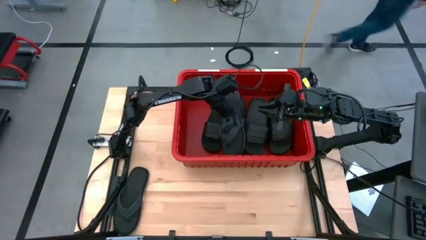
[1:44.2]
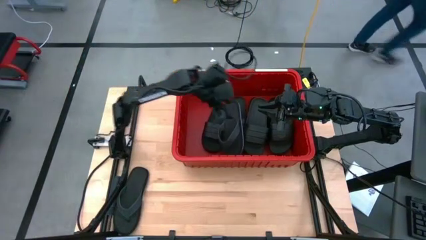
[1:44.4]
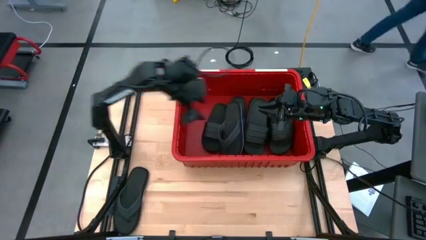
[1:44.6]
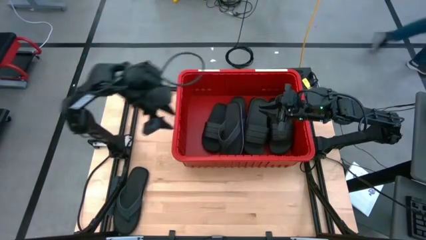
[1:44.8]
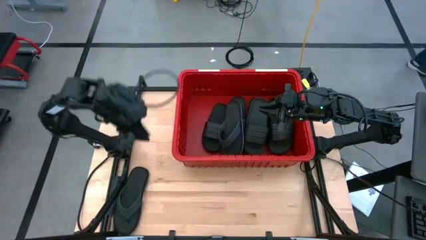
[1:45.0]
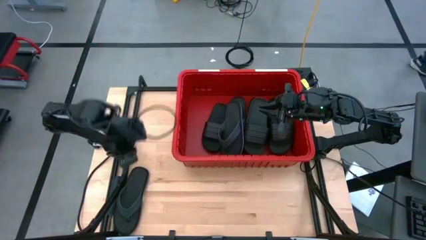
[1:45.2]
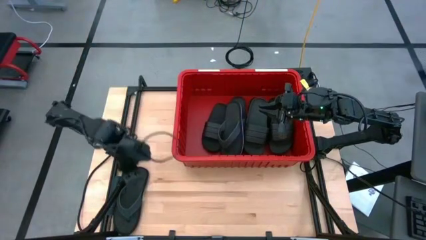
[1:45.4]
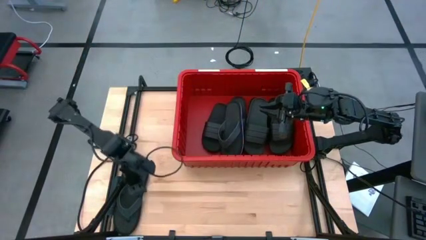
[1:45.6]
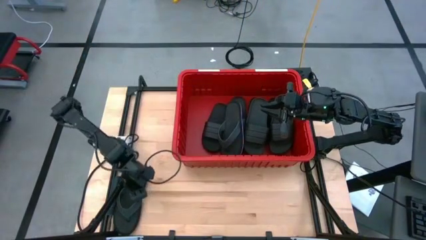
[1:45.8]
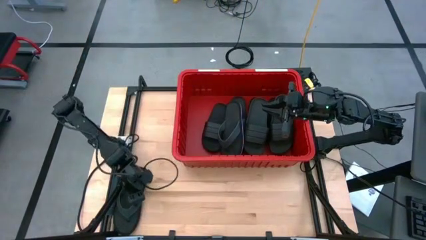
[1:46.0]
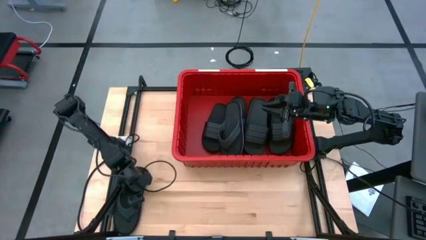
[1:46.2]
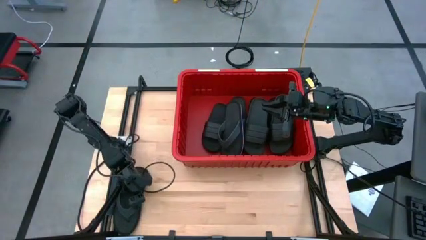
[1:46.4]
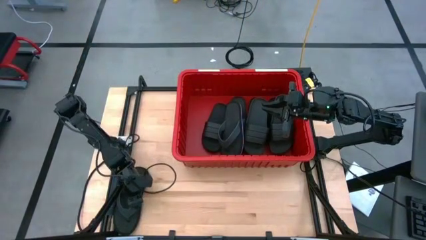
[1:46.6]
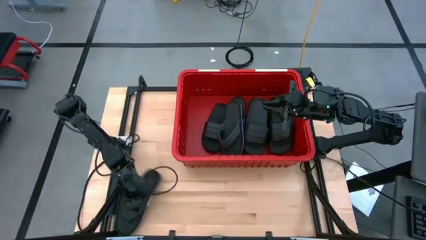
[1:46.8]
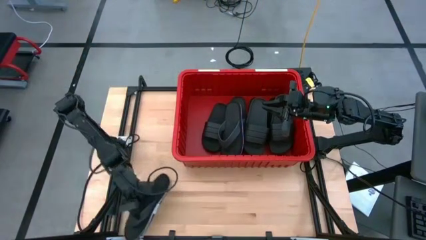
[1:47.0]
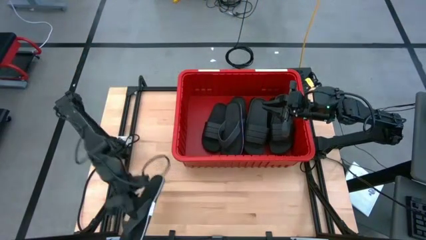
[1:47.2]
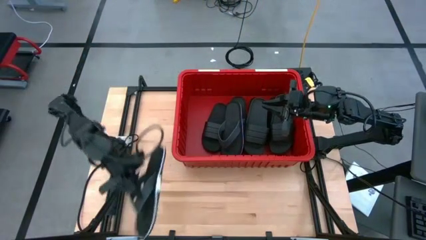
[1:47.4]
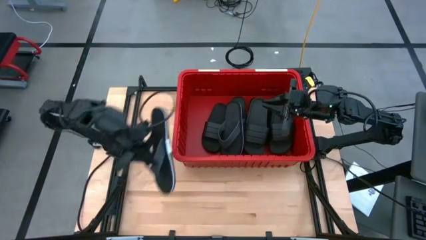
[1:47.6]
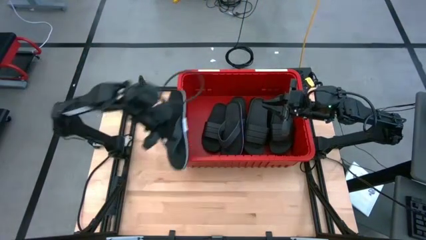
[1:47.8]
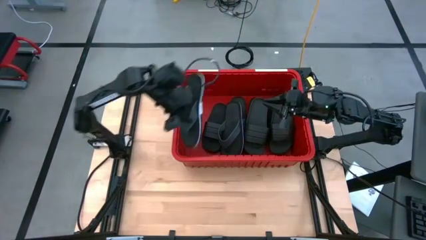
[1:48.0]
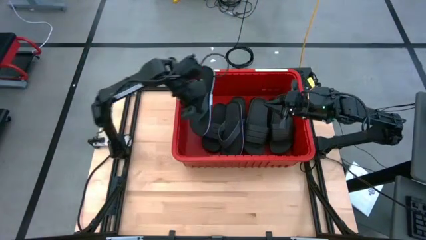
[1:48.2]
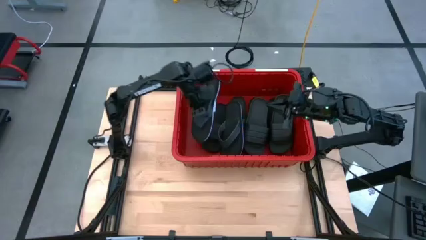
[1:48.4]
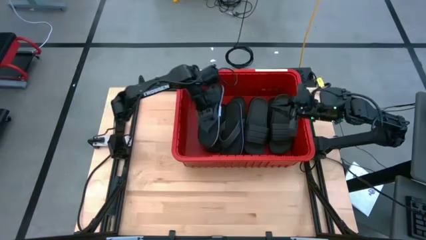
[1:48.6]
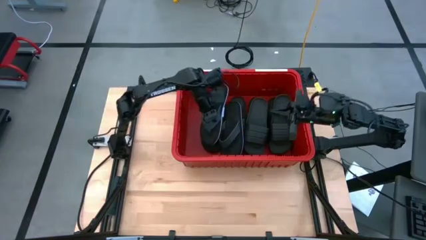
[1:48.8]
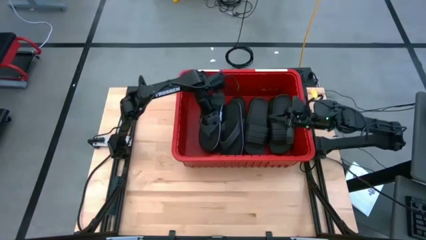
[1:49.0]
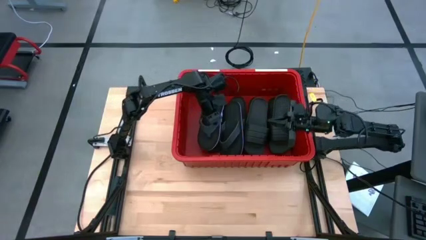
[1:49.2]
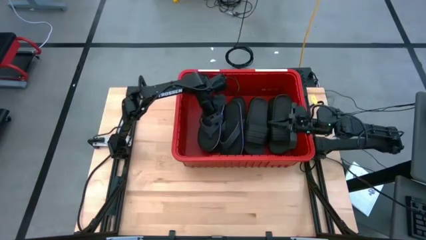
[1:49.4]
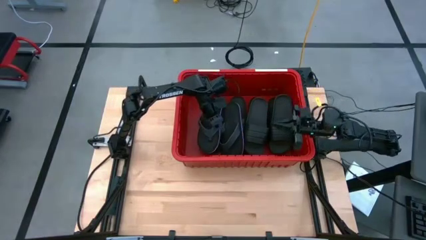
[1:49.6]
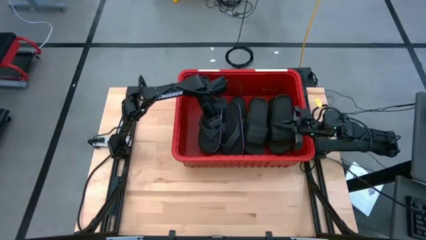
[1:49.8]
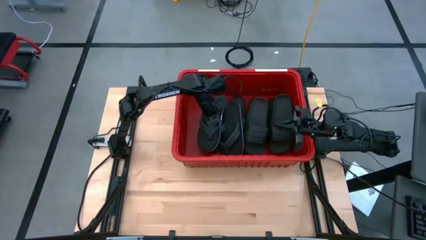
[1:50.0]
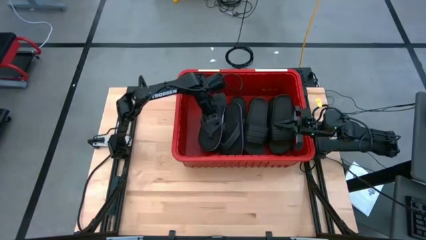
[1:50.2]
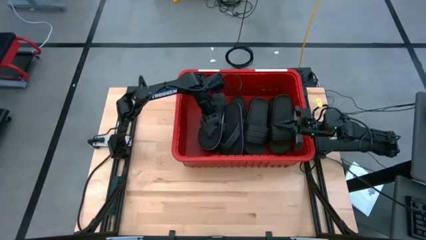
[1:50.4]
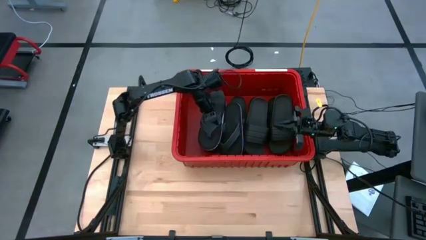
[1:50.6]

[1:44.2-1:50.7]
Task: Pick and place slides into bin
Put the black slipper into the red container

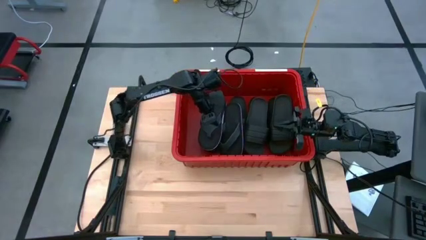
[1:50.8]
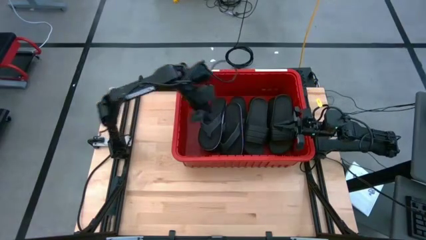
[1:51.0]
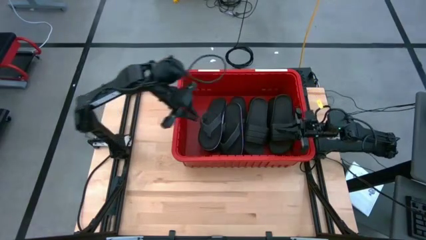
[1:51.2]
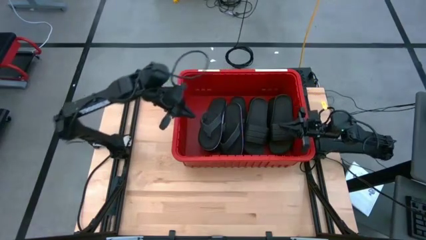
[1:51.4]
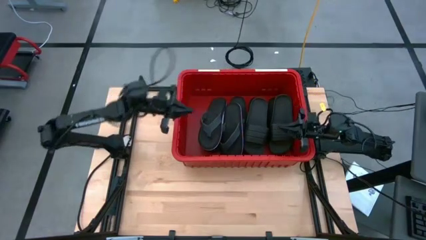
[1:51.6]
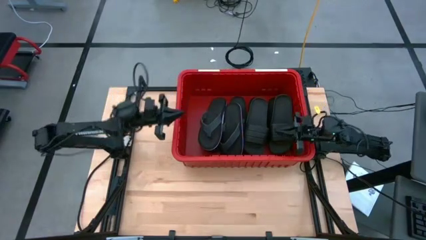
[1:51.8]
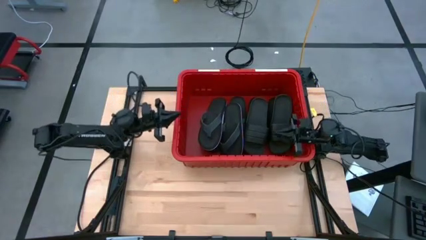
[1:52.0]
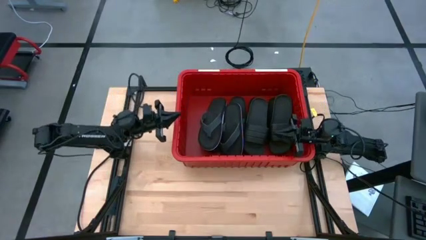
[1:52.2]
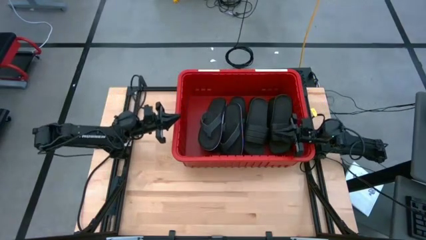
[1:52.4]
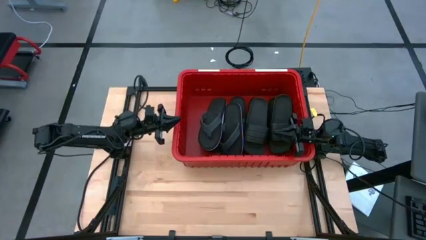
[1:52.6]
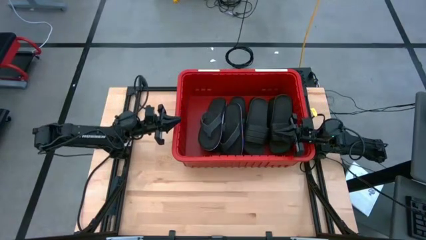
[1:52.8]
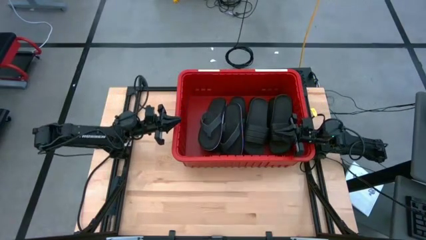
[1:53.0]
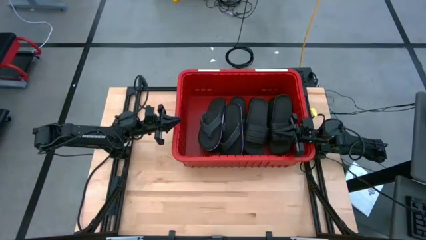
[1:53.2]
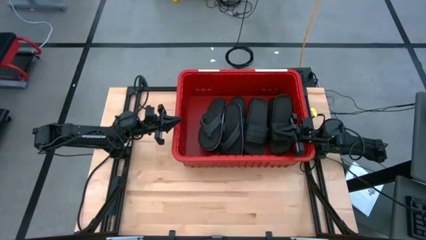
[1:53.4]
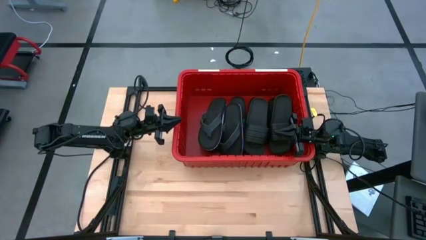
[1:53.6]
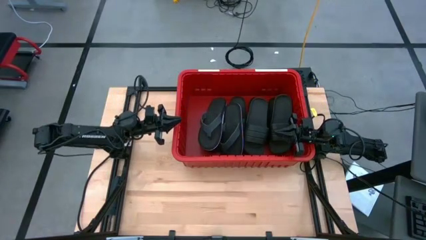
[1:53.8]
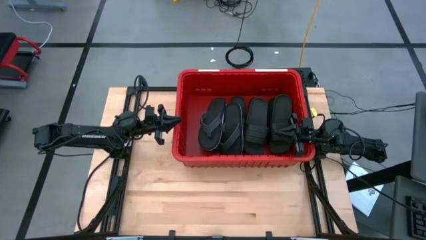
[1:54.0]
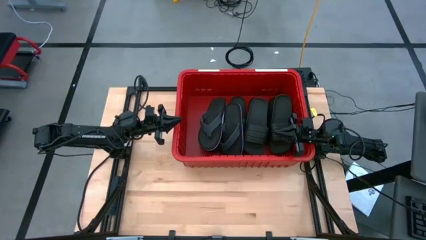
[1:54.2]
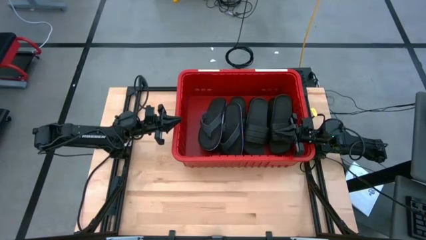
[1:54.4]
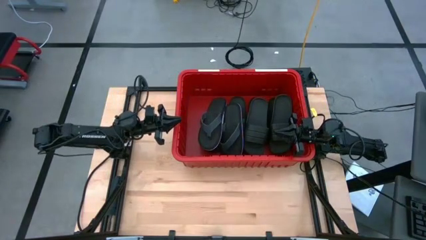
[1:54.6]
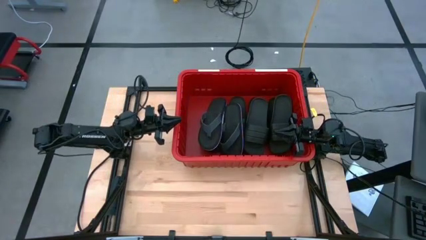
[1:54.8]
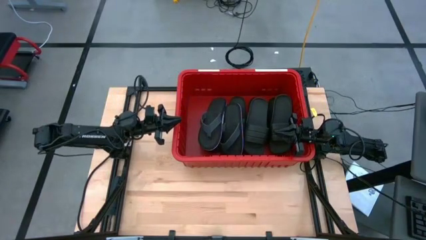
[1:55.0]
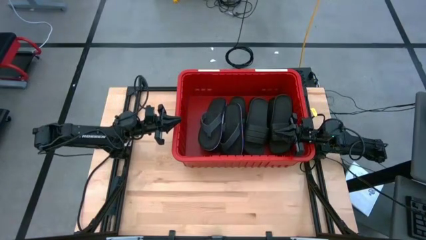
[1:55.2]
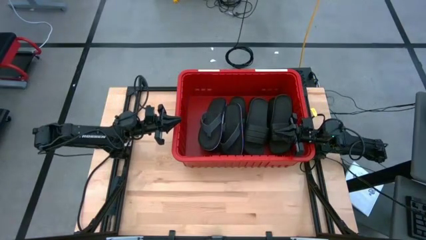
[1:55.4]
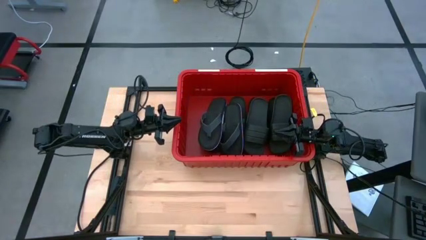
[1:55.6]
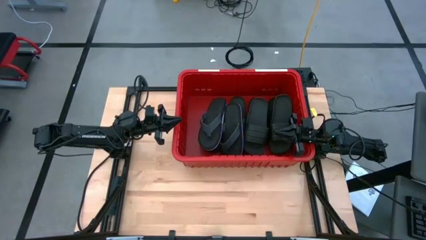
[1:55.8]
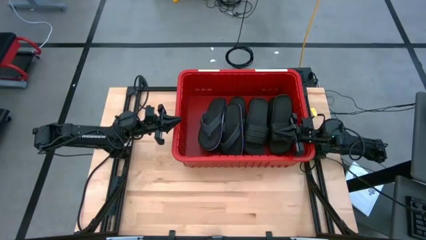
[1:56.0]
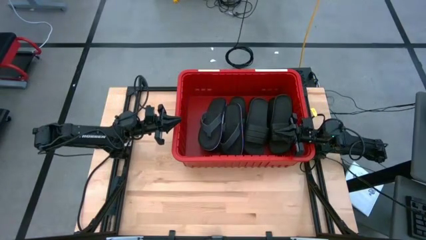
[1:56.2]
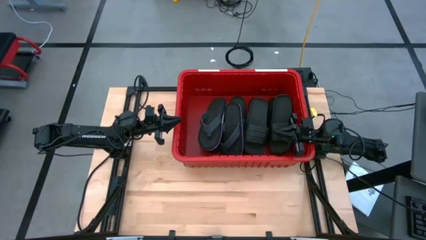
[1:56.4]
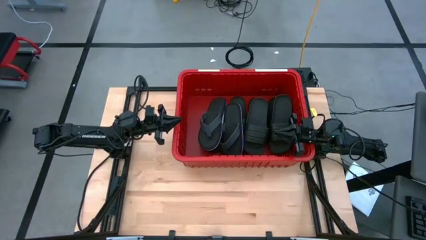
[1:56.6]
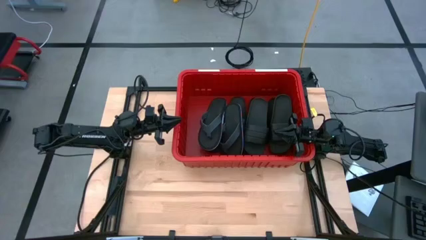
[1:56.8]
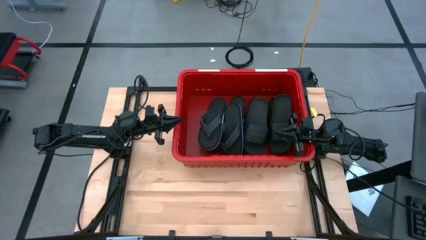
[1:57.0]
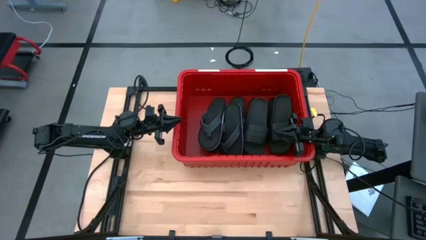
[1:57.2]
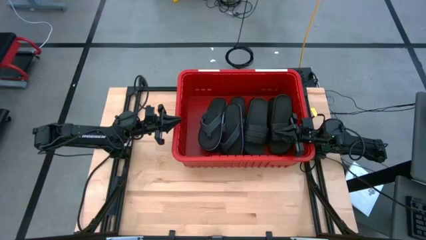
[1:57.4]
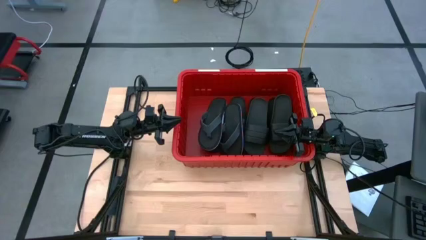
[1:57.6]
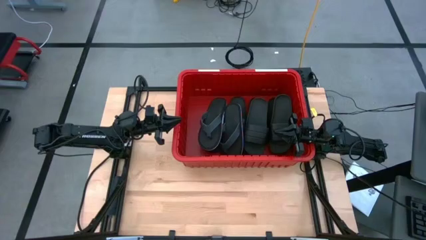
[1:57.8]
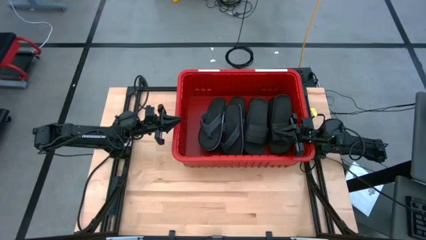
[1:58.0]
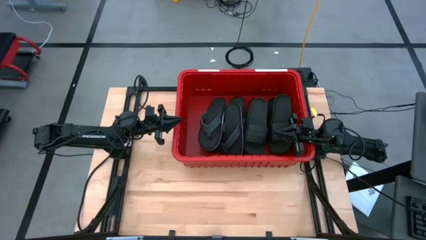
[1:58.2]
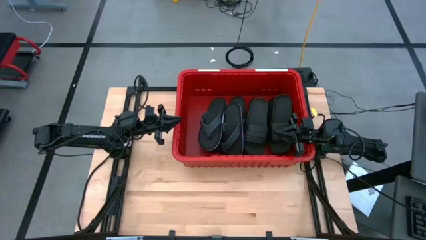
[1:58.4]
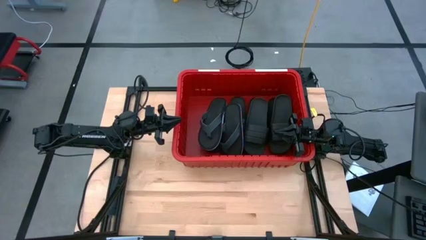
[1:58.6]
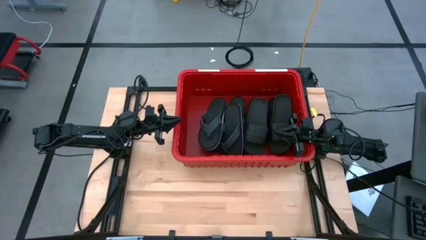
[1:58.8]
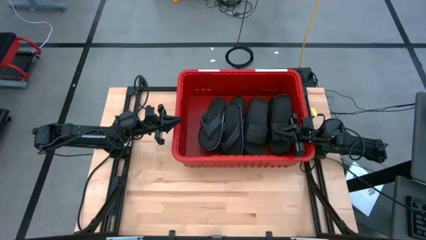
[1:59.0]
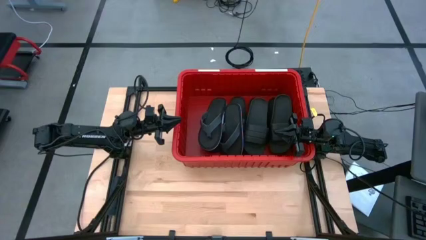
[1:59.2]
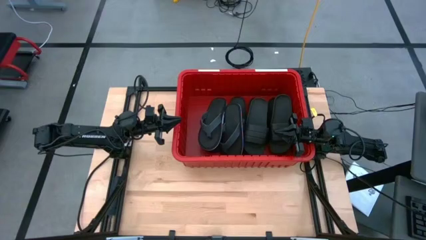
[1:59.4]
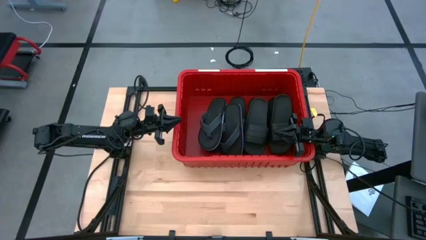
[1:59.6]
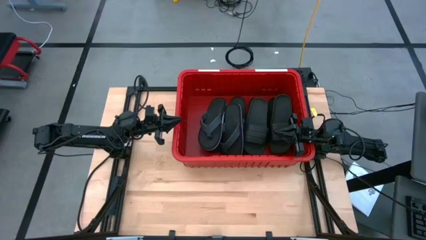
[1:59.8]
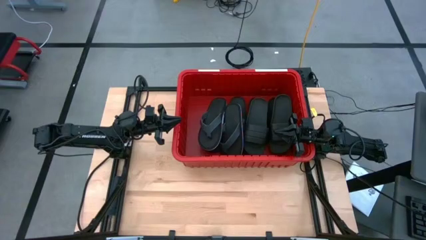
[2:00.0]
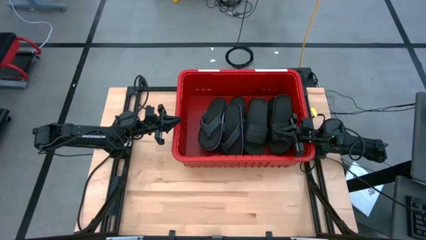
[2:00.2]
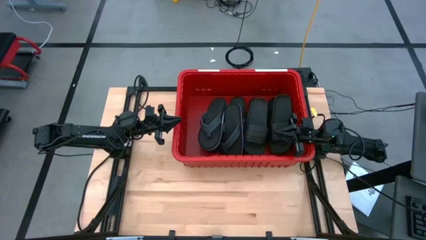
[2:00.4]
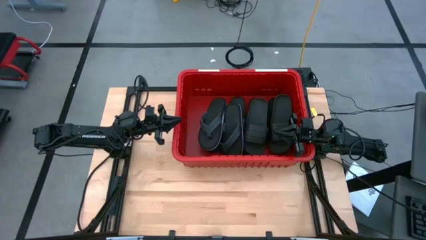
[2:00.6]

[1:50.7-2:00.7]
Return to Home Position
